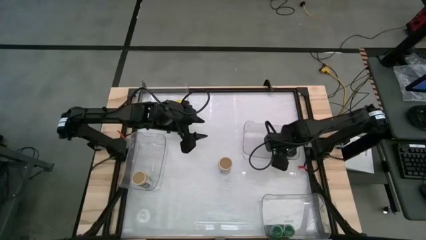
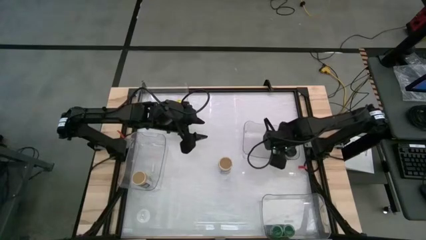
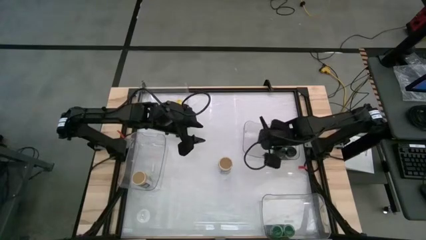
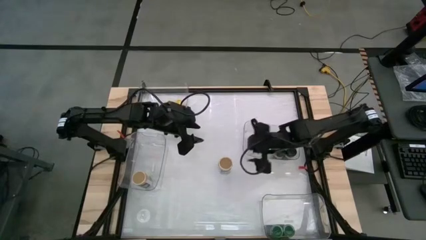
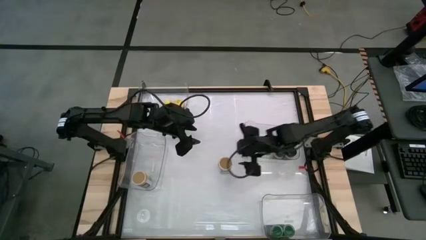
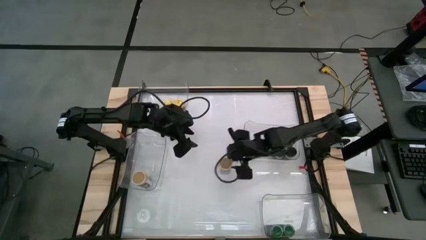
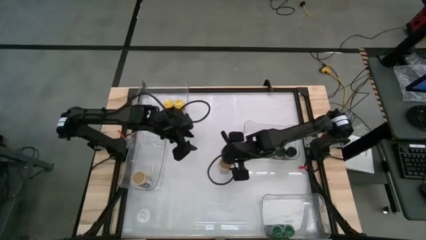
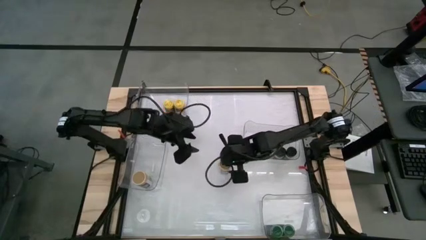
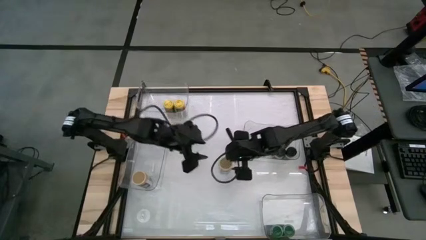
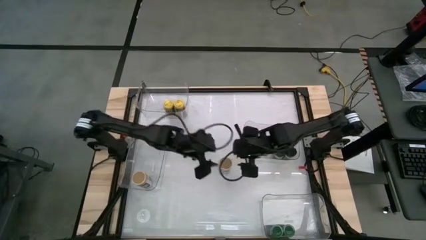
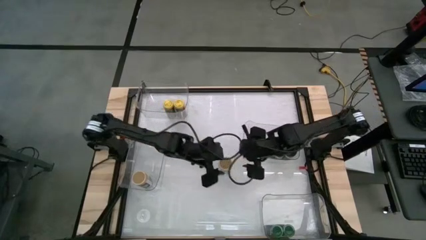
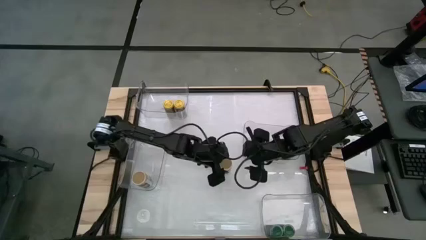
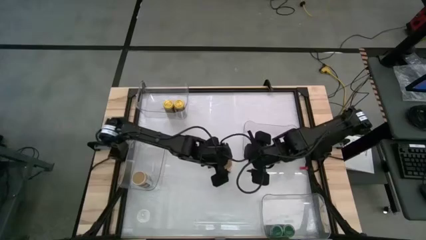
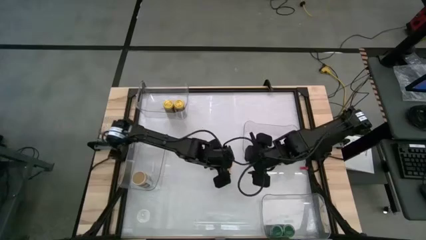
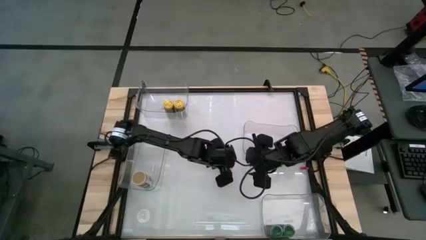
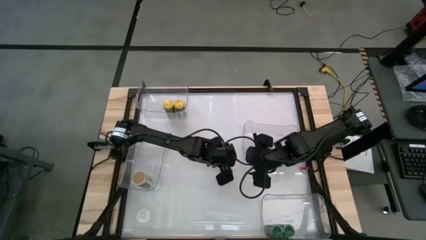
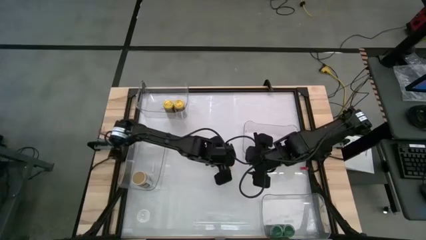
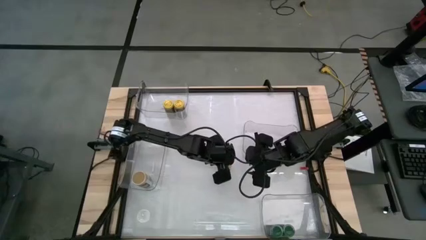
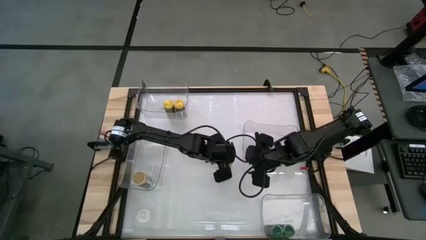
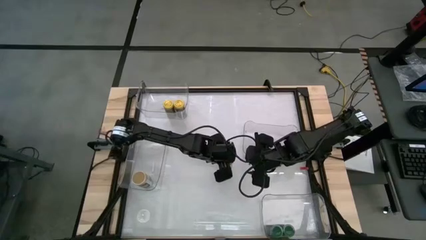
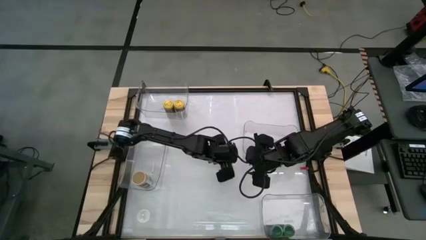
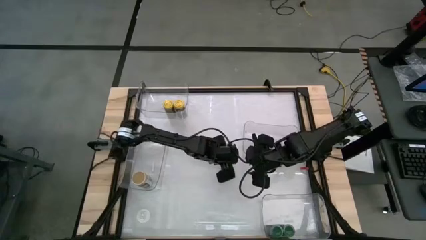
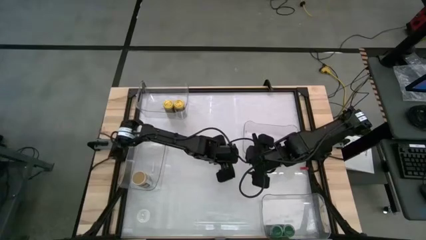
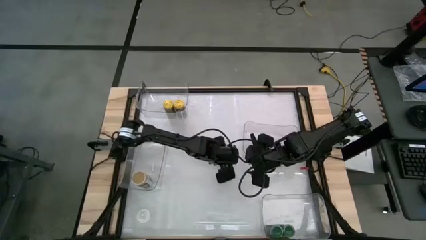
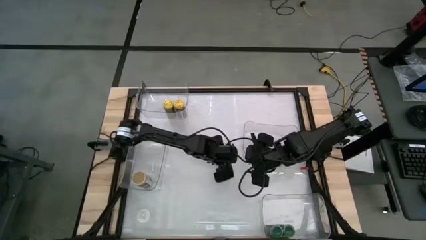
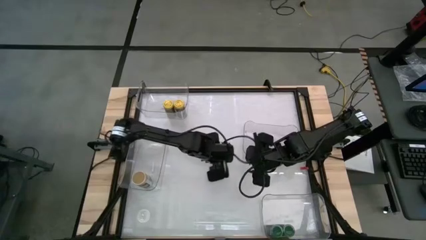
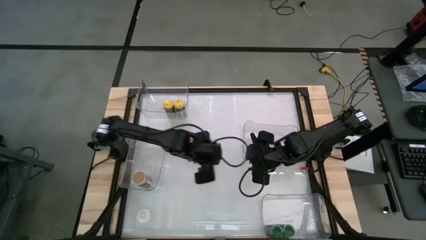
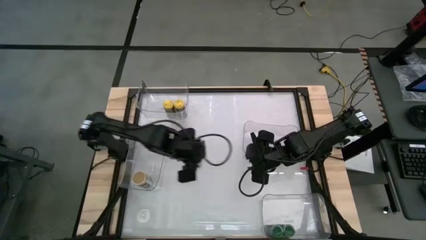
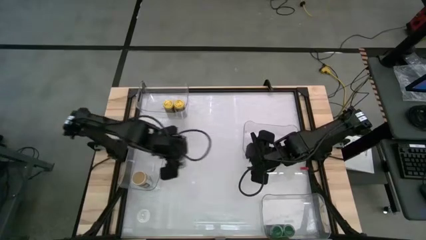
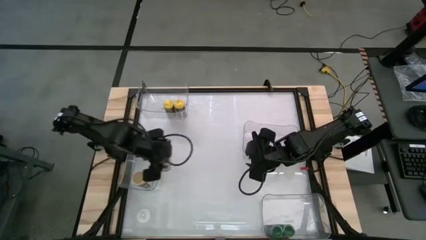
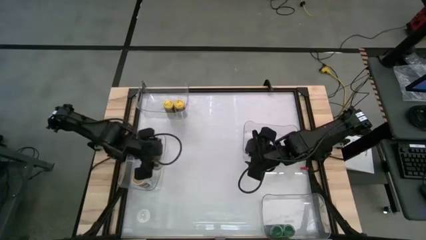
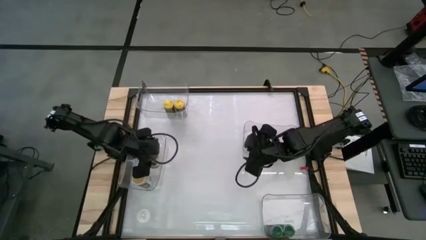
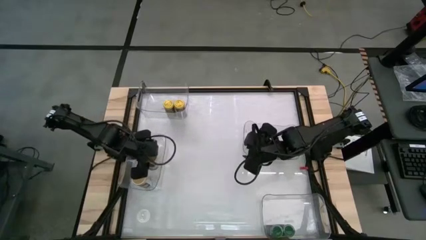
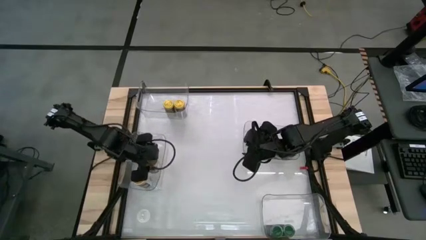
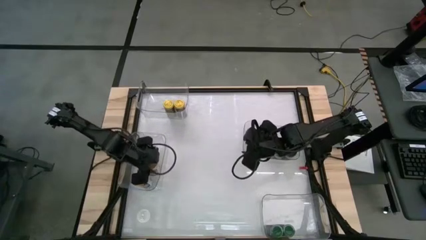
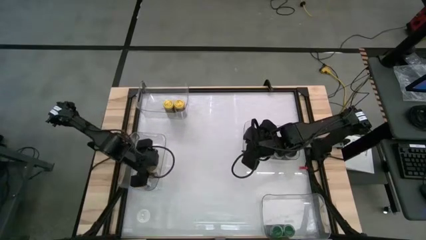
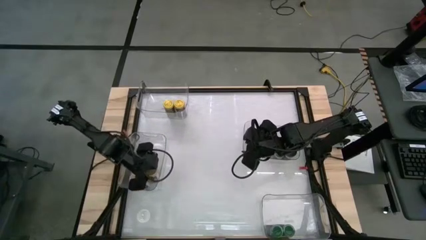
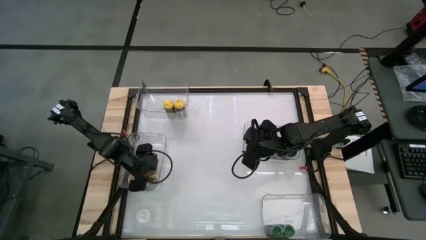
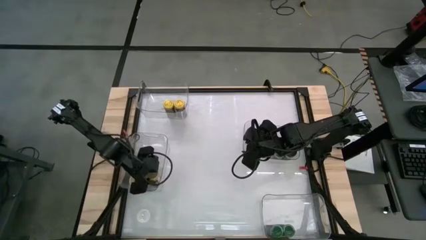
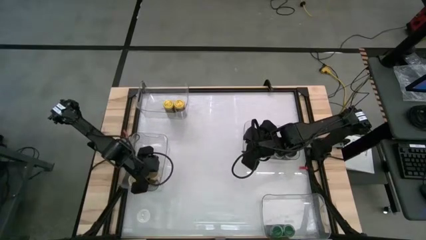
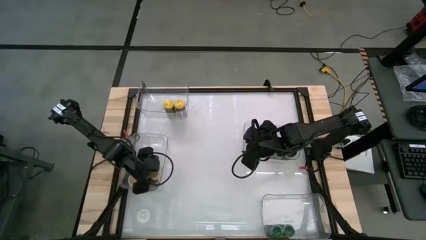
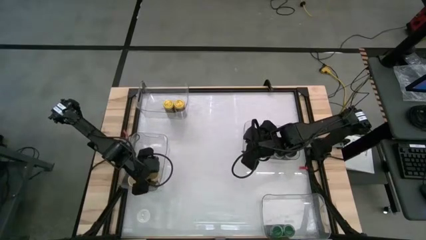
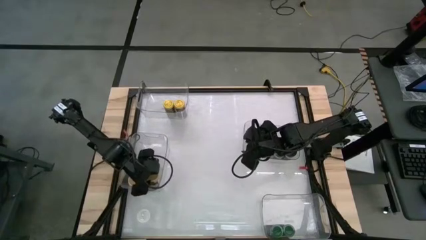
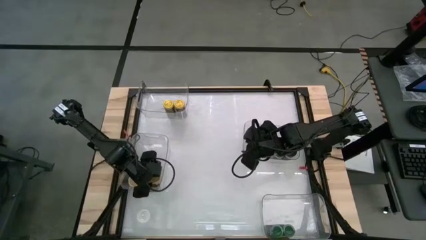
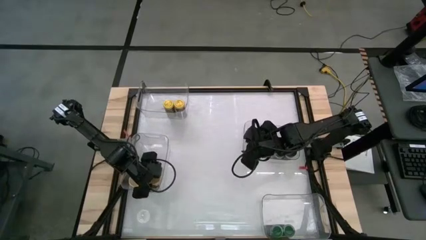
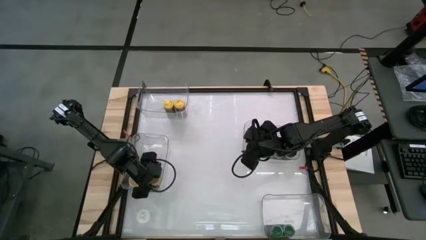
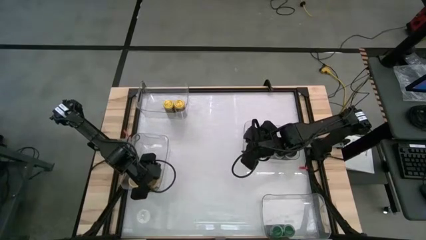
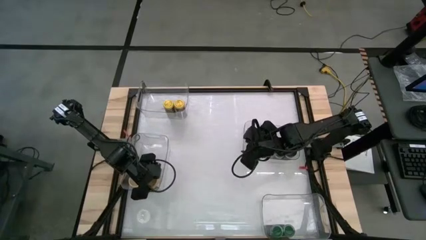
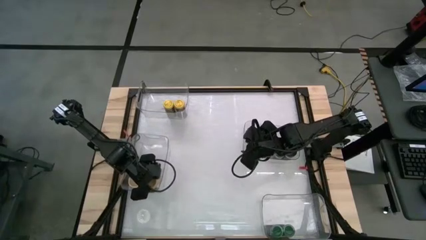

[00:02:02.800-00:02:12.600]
Task: Sort spices by type
Put the gold seasoning bottle into the middle left transparent bin

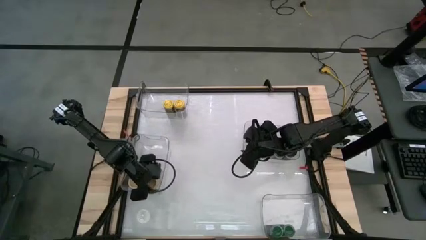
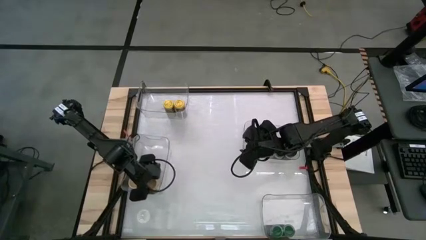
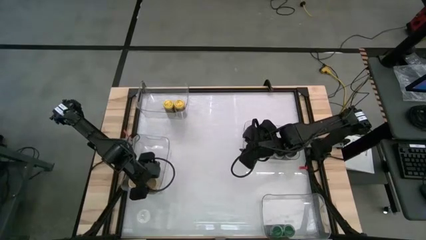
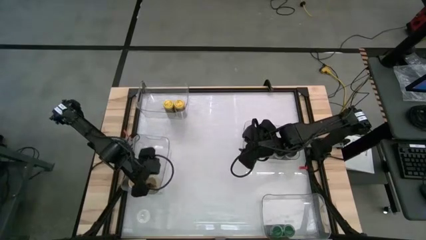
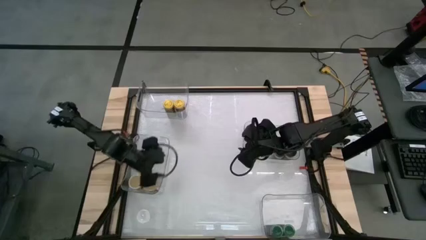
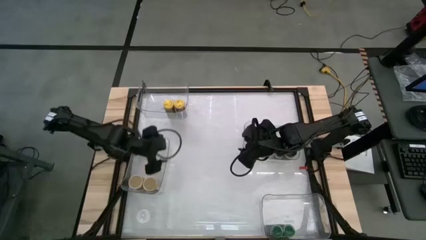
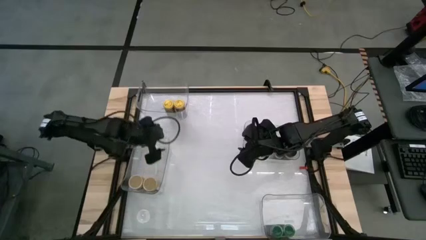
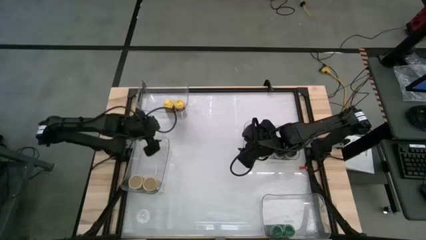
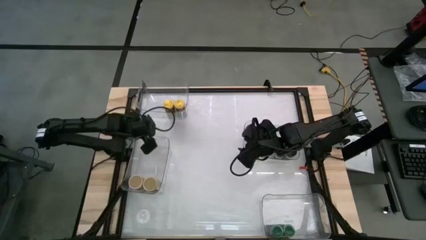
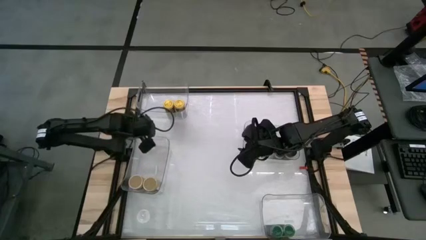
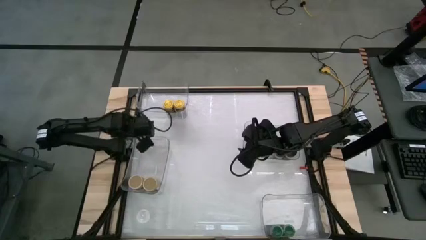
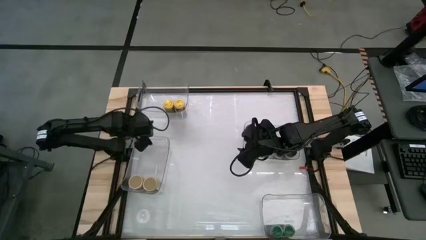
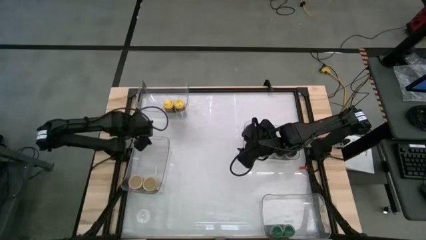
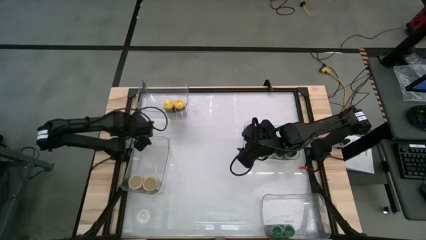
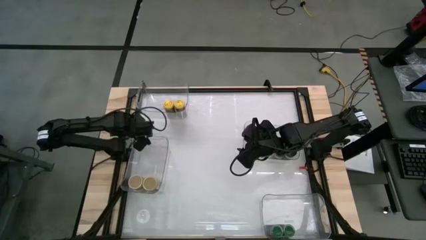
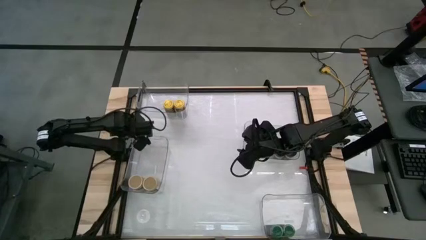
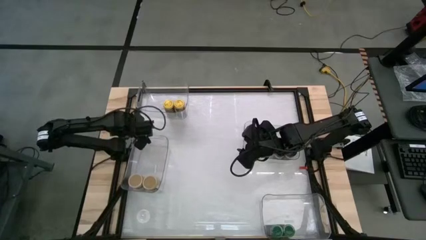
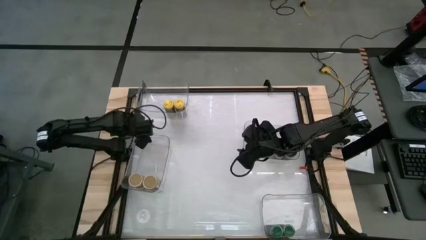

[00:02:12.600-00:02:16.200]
Adjust the middle right transparent bin
